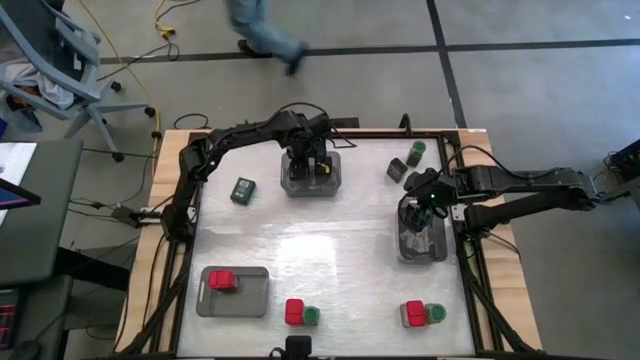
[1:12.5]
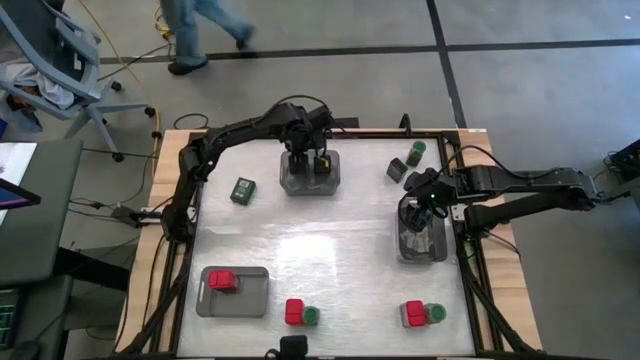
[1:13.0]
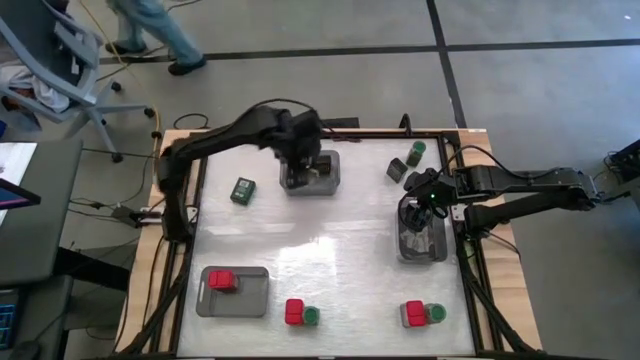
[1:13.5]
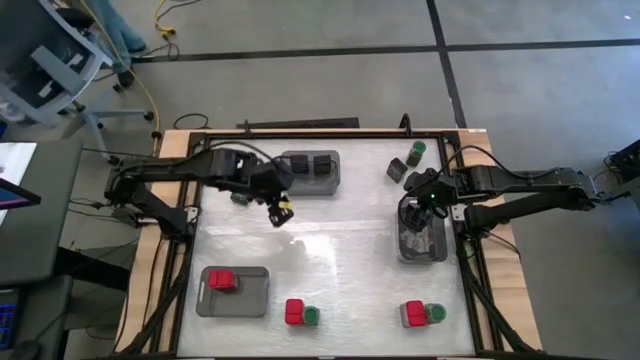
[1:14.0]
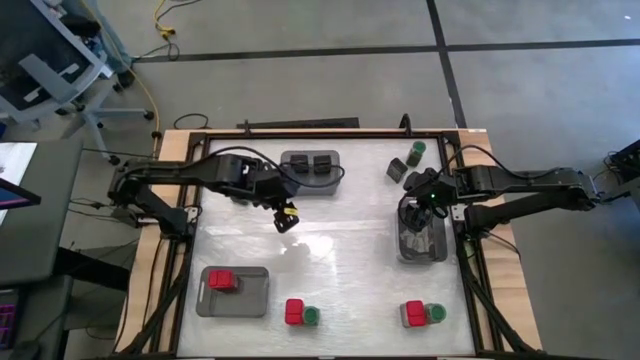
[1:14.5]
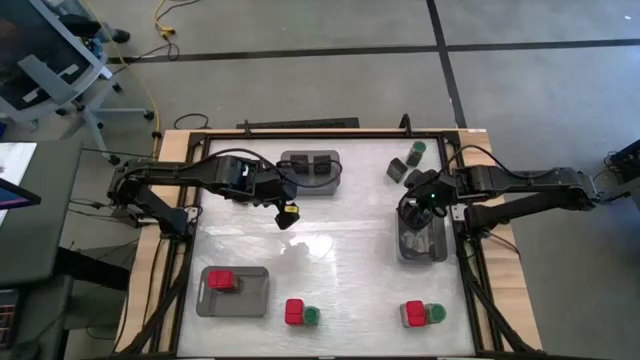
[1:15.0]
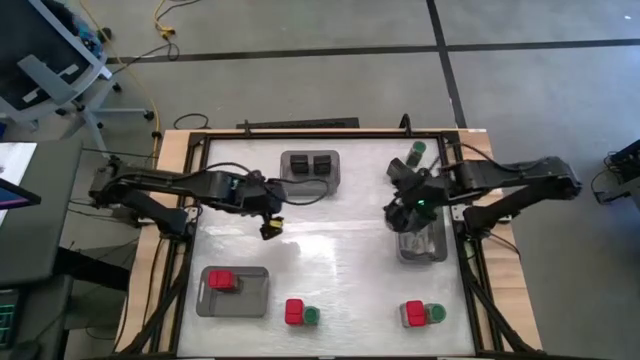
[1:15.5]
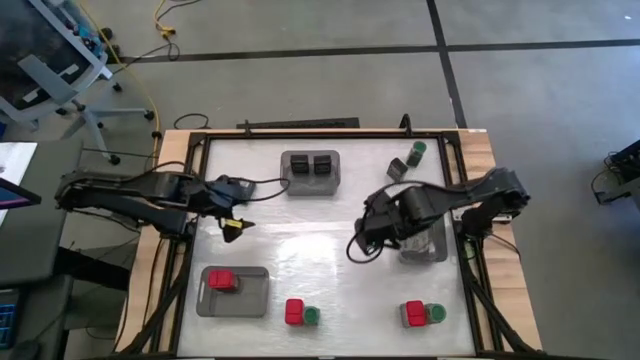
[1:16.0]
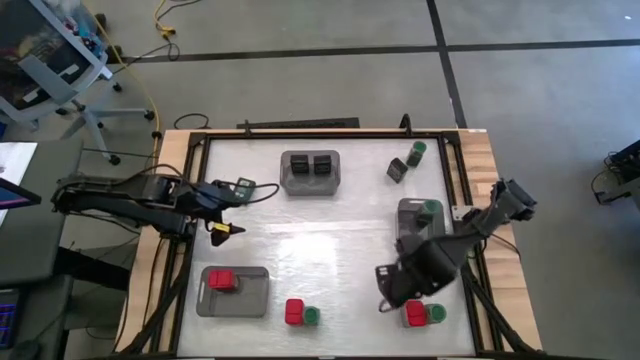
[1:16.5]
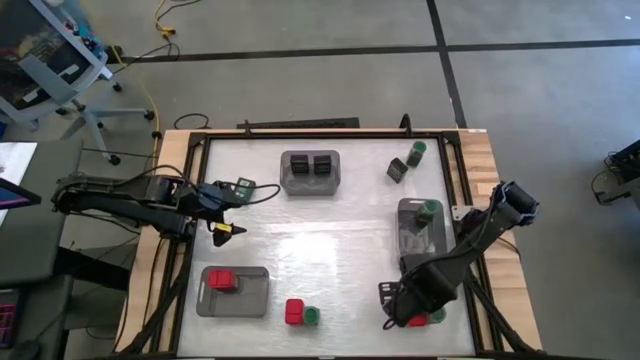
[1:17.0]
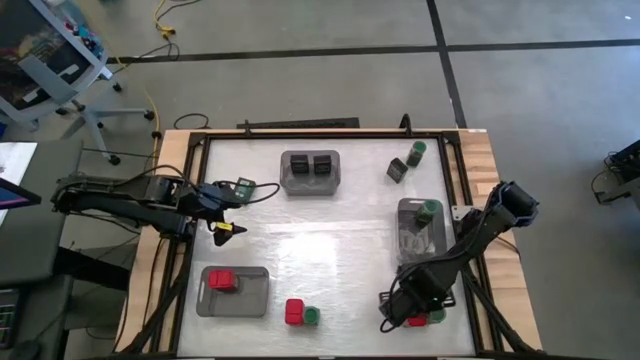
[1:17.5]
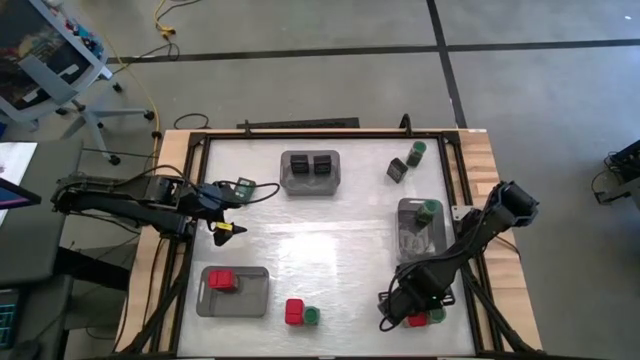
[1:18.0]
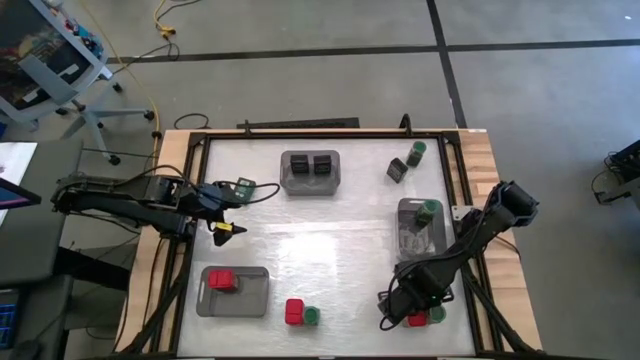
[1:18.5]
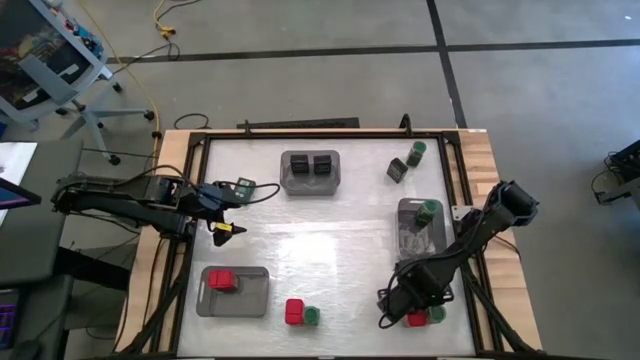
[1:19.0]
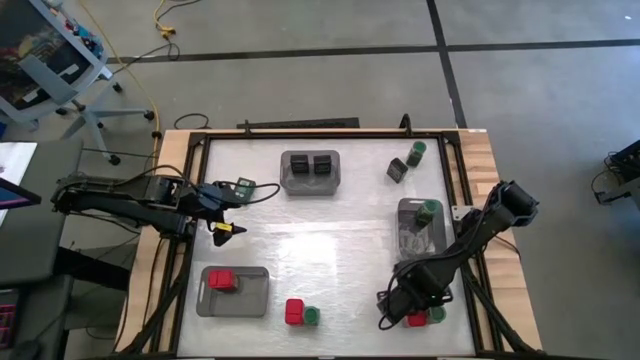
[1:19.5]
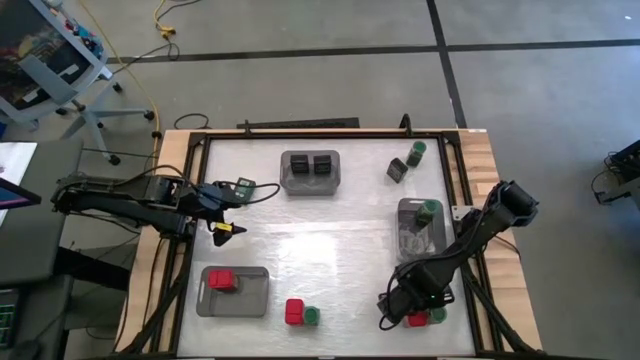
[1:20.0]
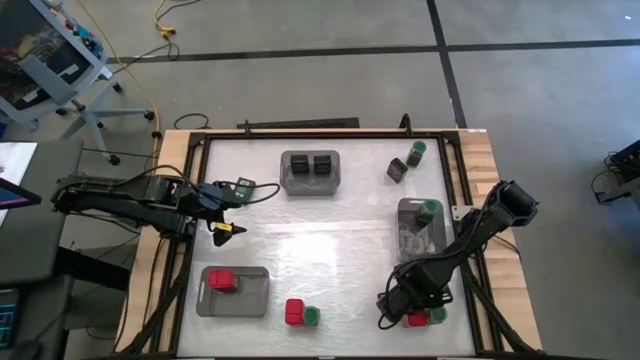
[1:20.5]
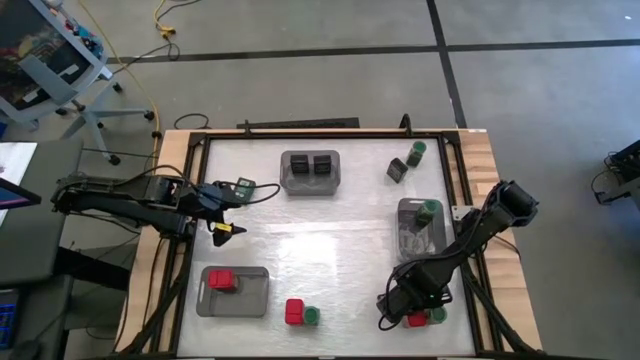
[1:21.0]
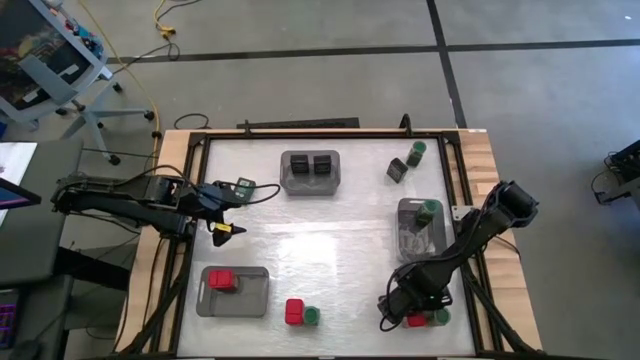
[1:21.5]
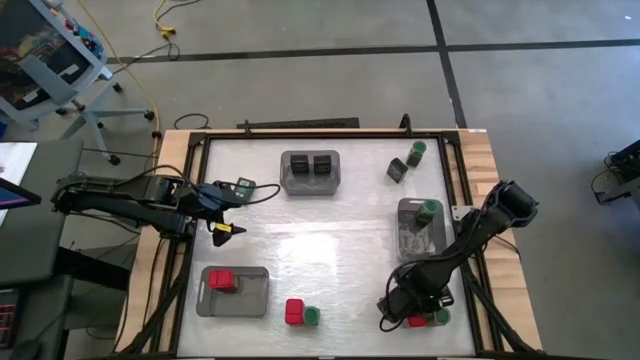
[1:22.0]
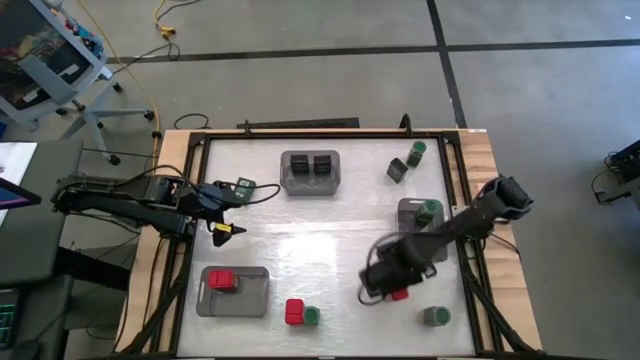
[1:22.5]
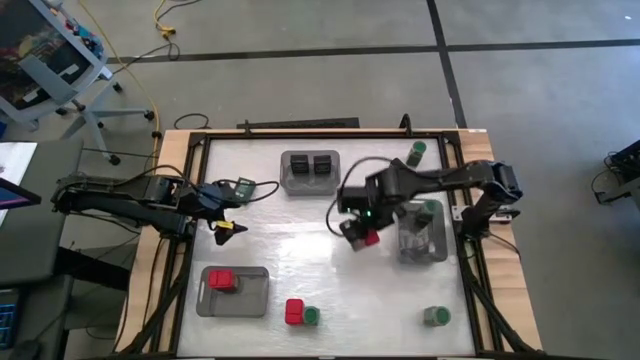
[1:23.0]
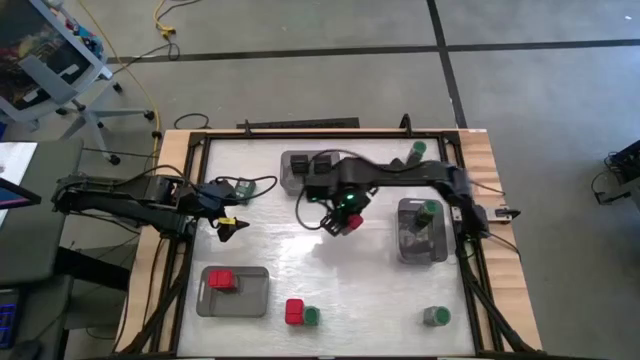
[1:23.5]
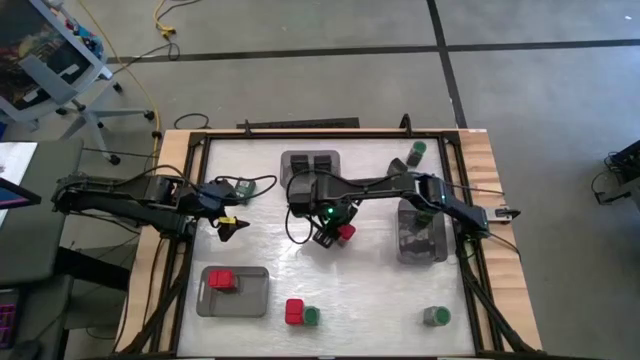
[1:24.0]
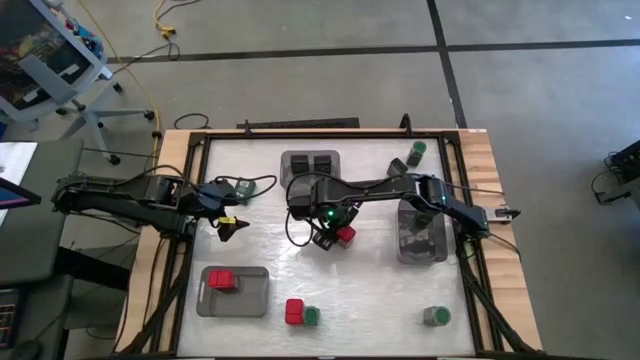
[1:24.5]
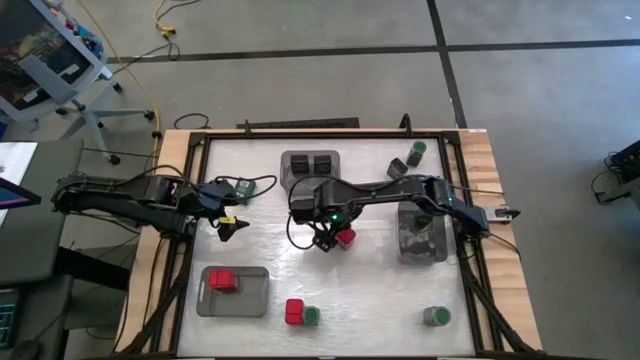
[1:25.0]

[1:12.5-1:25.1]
Task: Sort spices by type
Put the right red seasoning can into the bottom black transparent bin

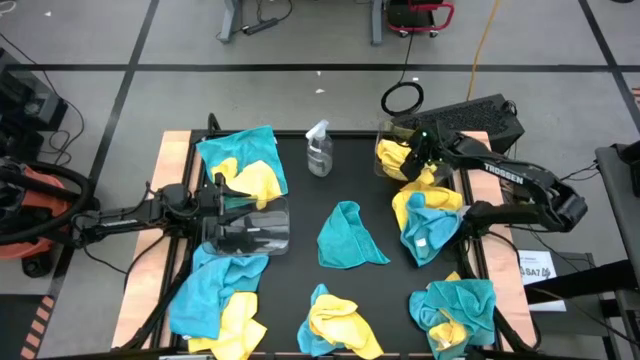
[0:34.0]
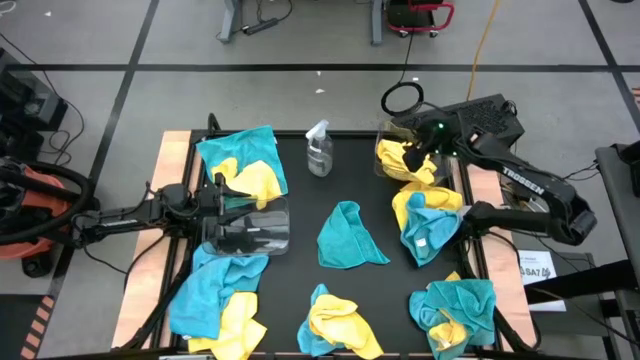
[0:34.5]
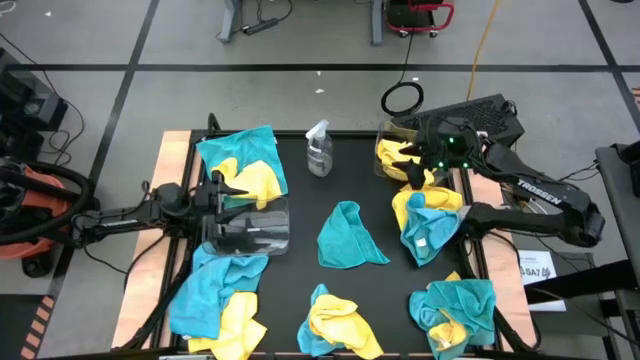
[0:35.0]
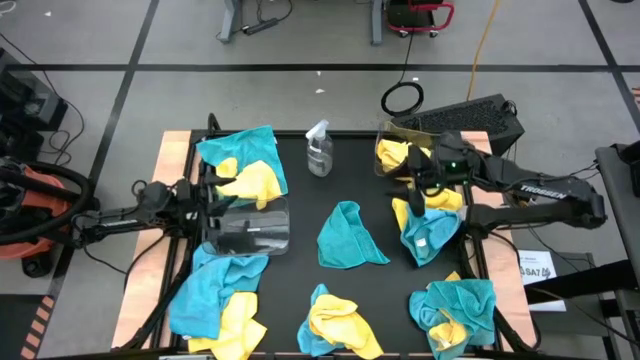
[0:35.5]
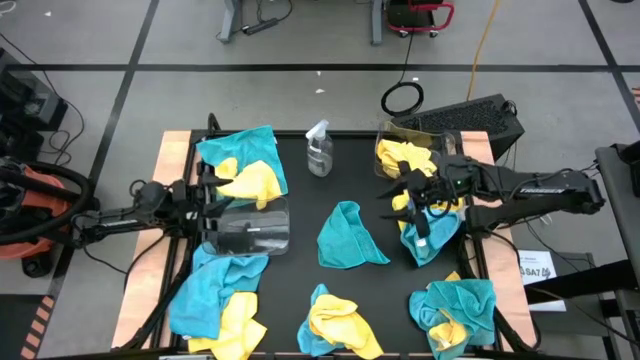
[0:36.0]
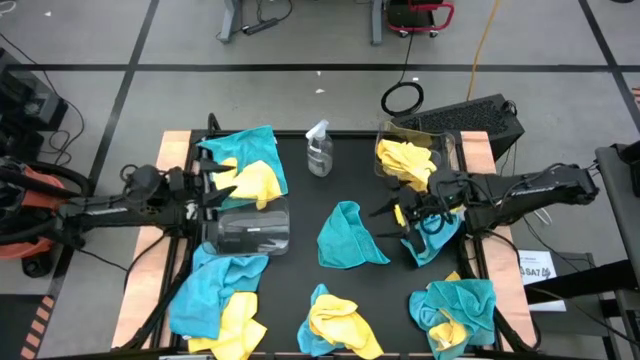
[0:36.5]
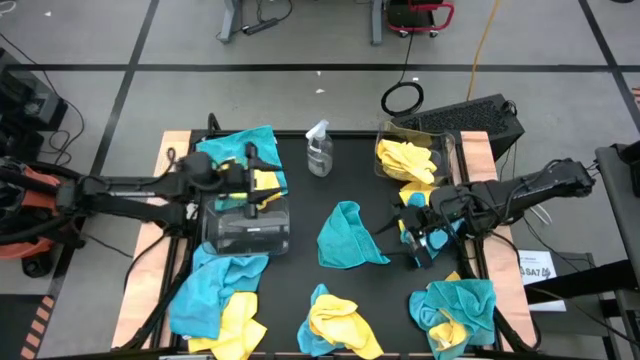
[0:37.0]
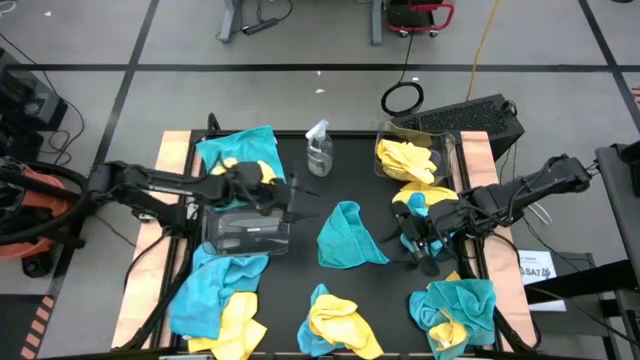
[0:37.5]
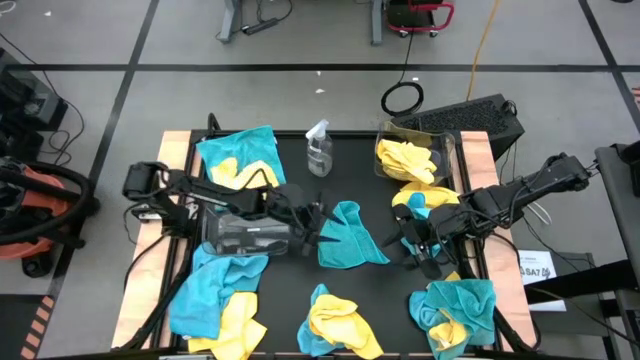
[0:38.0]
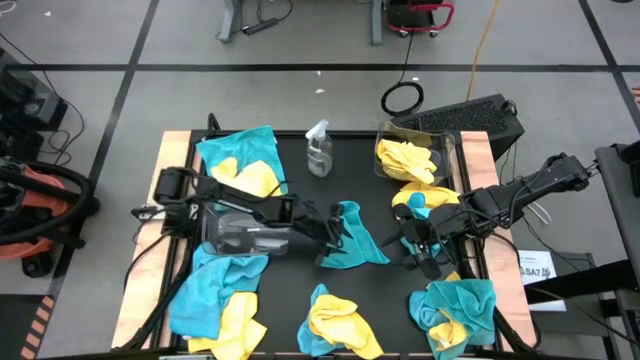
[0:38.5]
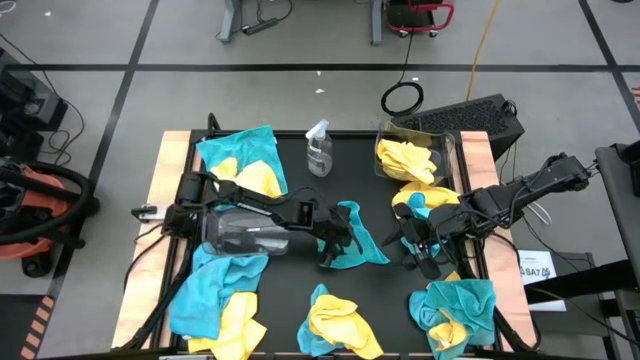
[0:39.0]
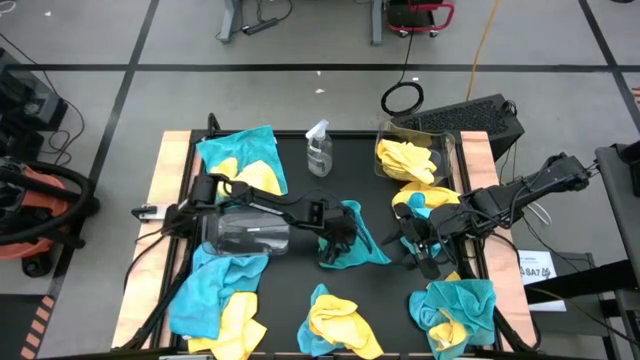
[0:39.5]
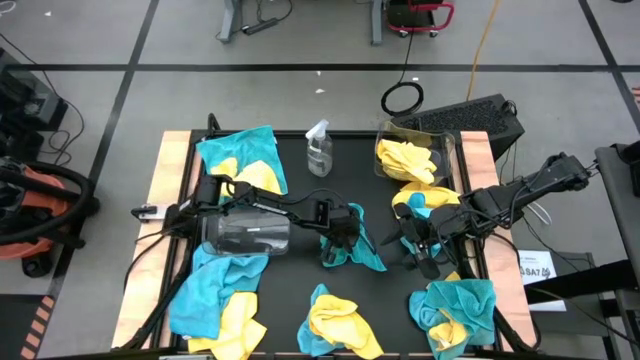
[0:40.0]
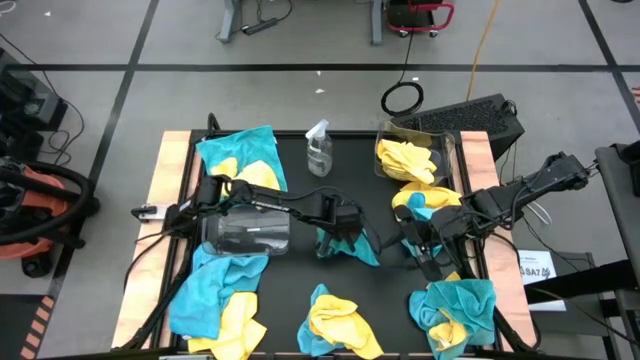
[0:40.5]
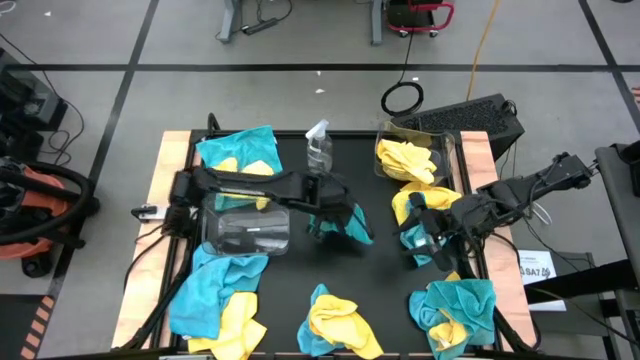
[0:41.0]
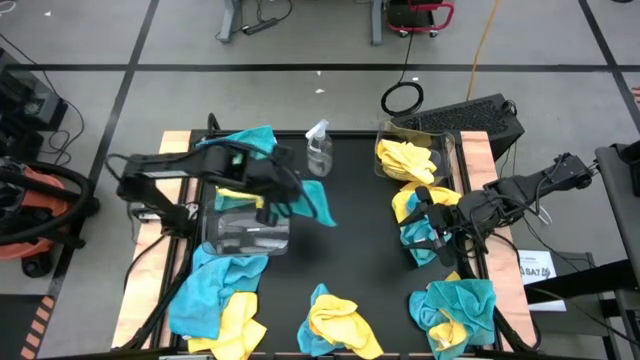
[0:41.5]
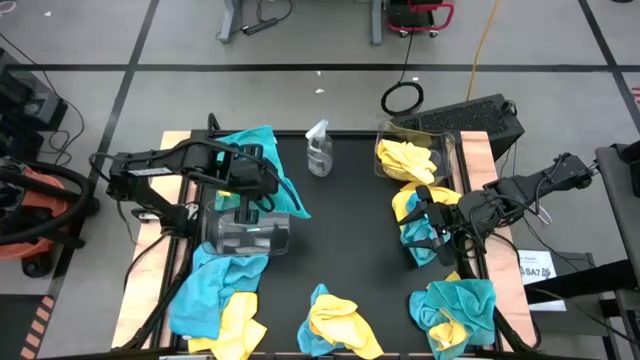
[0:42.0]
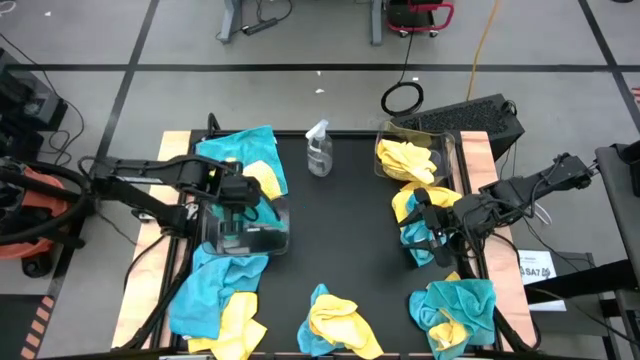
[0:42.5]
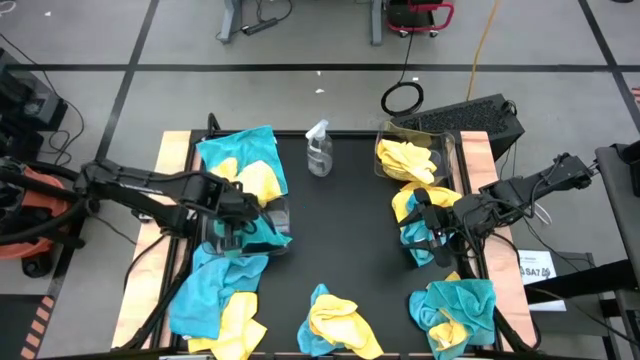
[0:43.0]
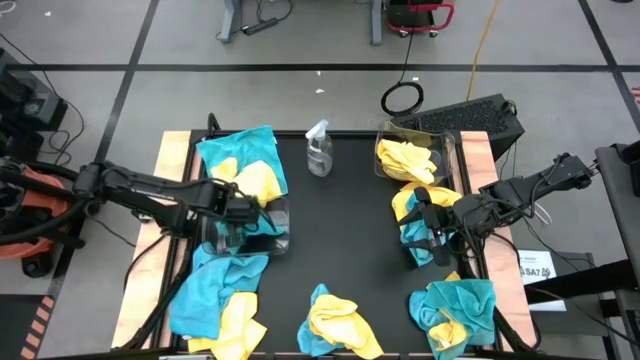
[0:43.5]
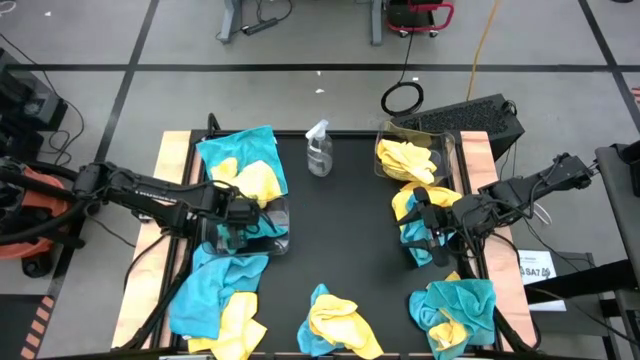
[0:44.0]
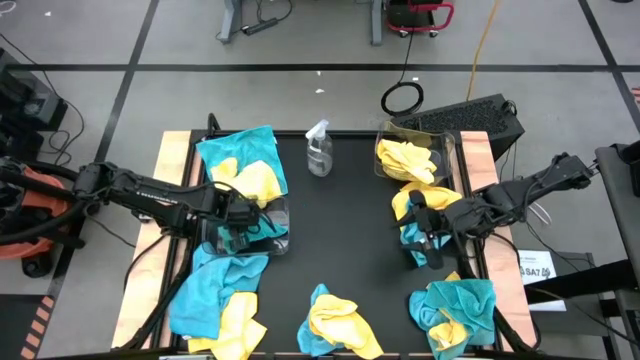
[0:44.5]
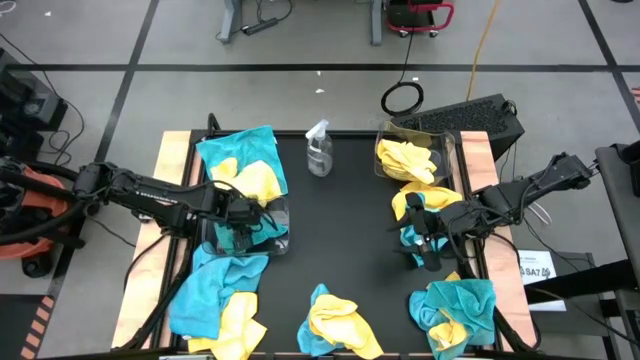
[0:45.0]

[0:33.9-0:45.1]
Task: Sort microfiber towel by color & place in baskets
Put the blue towel into the bottom transparent bin
